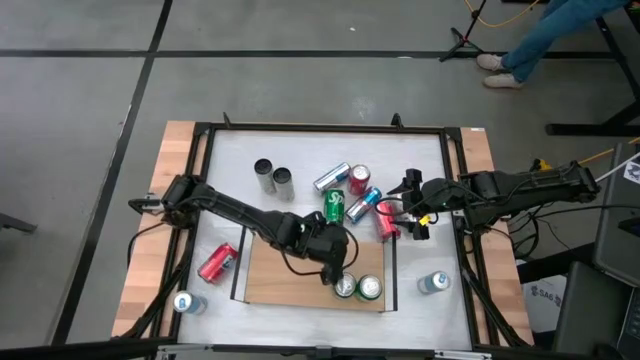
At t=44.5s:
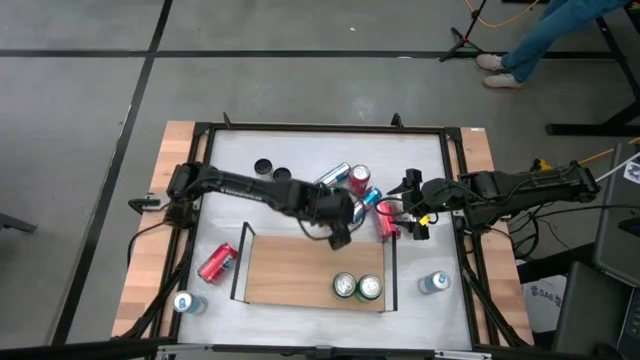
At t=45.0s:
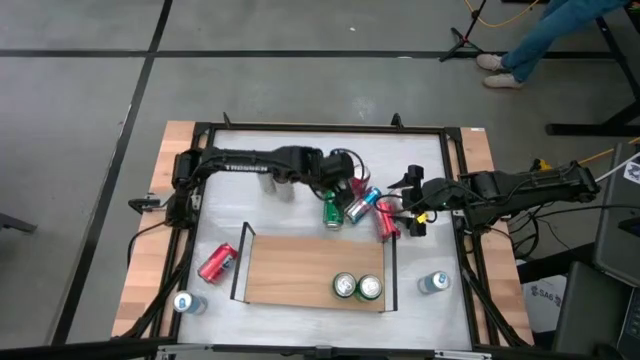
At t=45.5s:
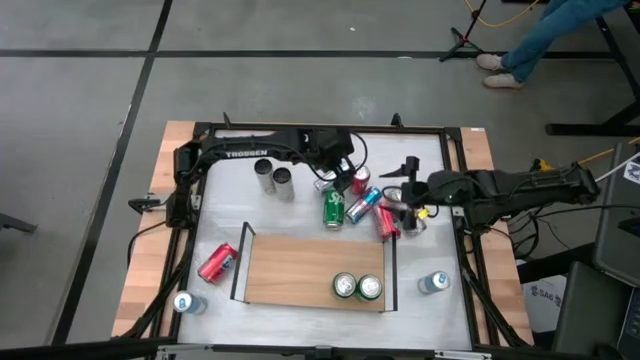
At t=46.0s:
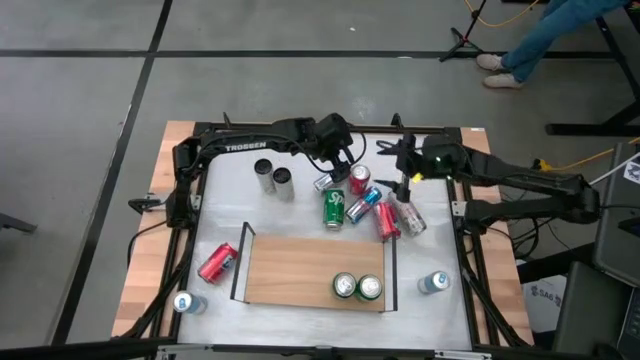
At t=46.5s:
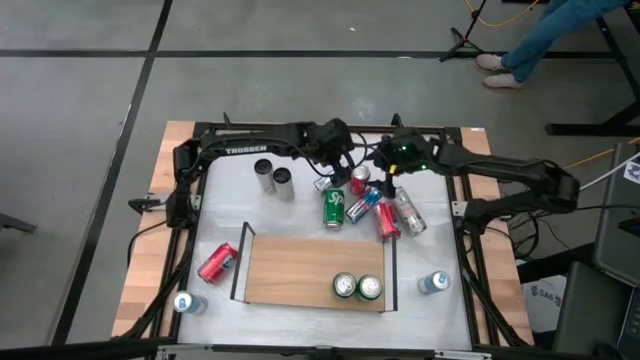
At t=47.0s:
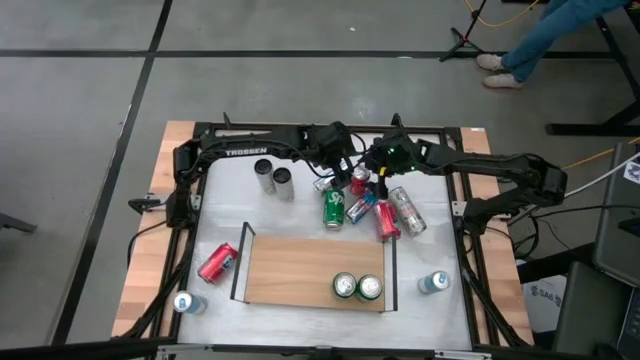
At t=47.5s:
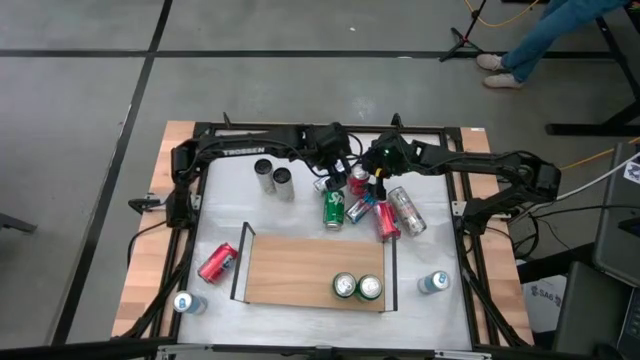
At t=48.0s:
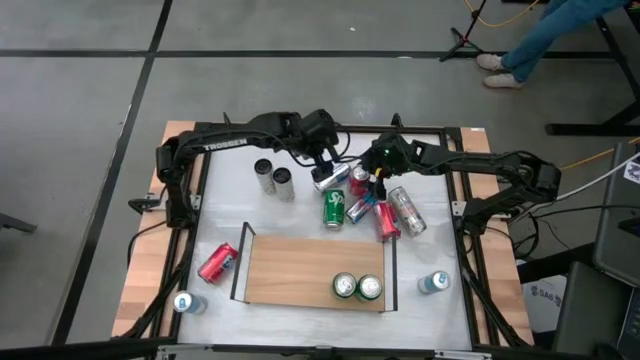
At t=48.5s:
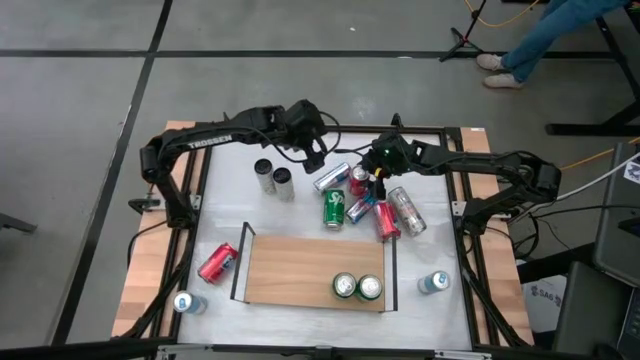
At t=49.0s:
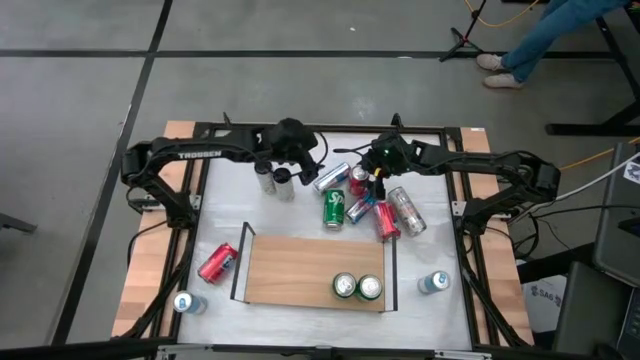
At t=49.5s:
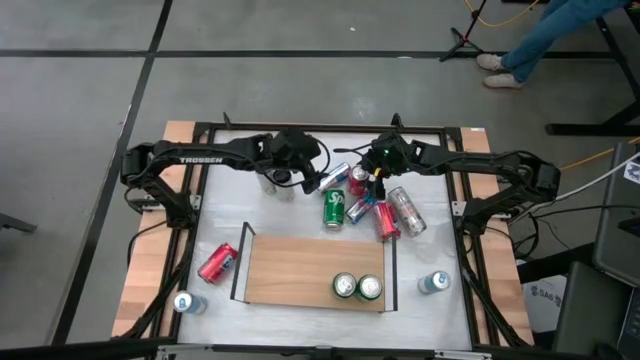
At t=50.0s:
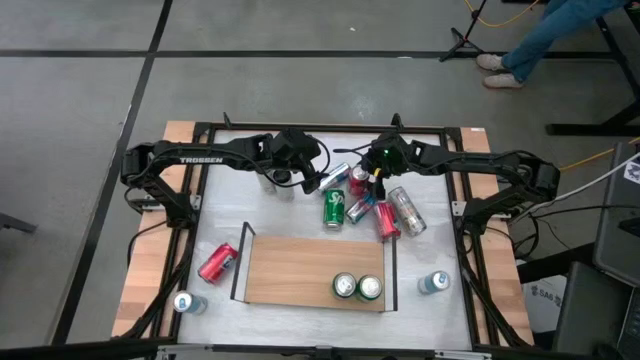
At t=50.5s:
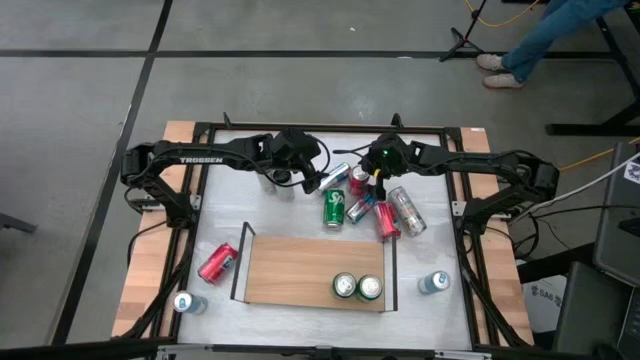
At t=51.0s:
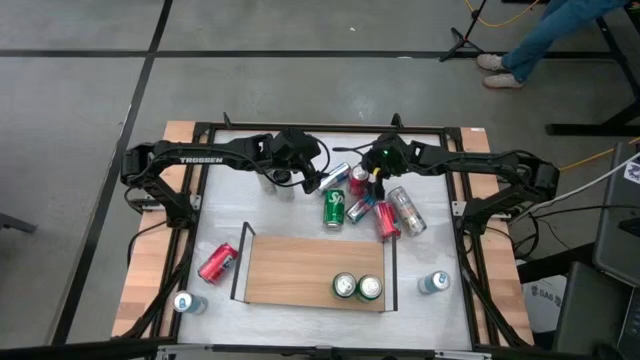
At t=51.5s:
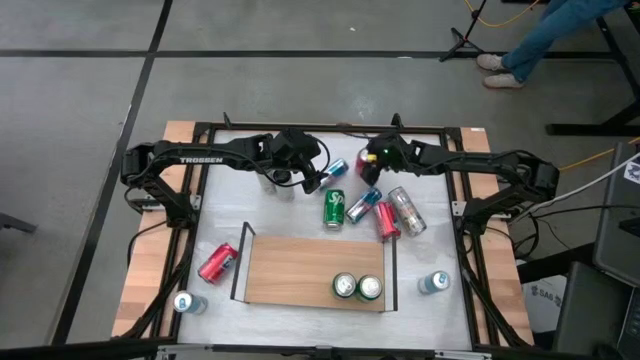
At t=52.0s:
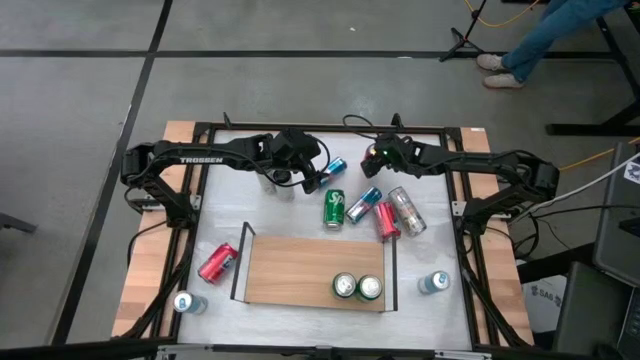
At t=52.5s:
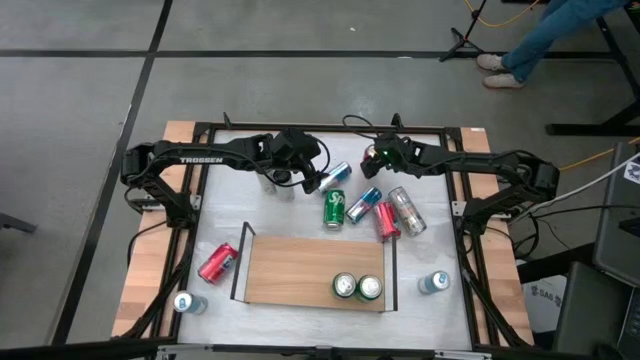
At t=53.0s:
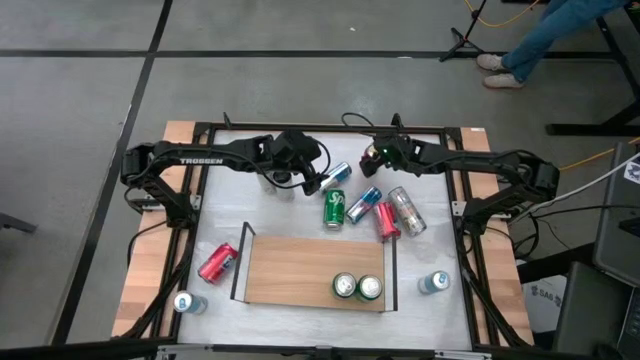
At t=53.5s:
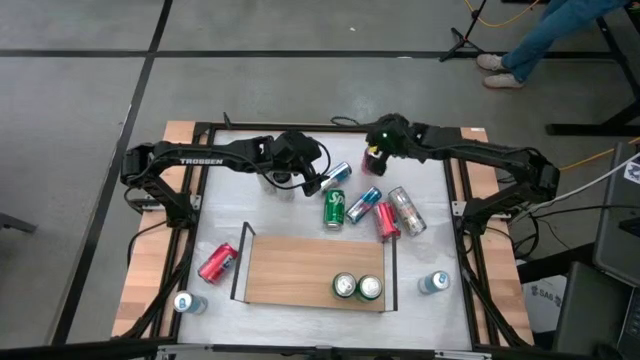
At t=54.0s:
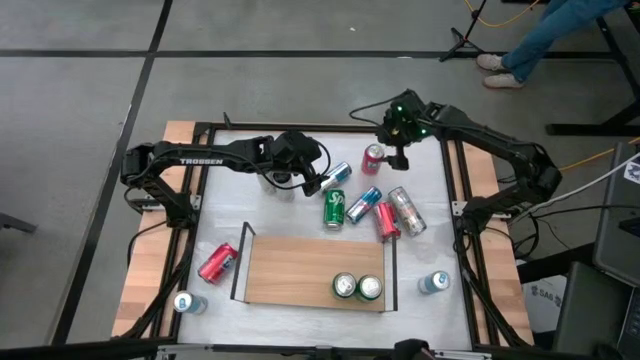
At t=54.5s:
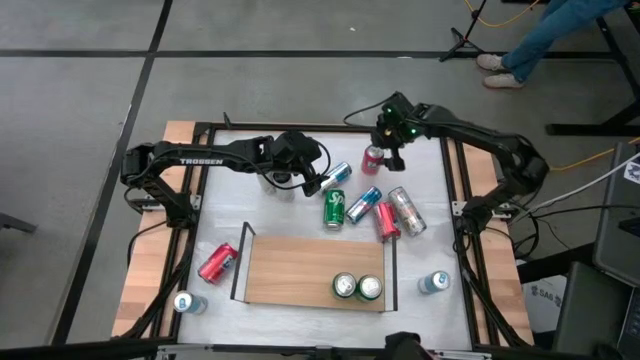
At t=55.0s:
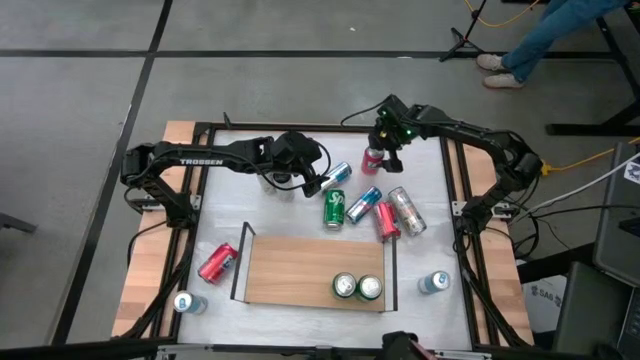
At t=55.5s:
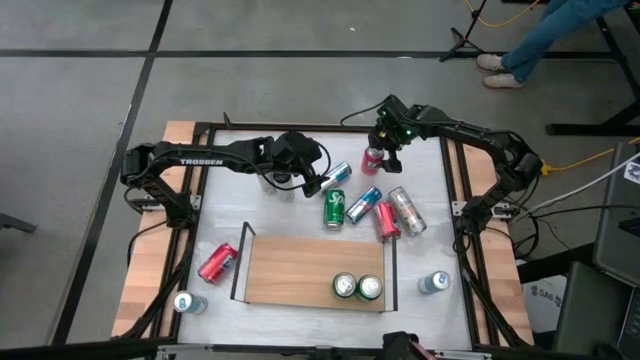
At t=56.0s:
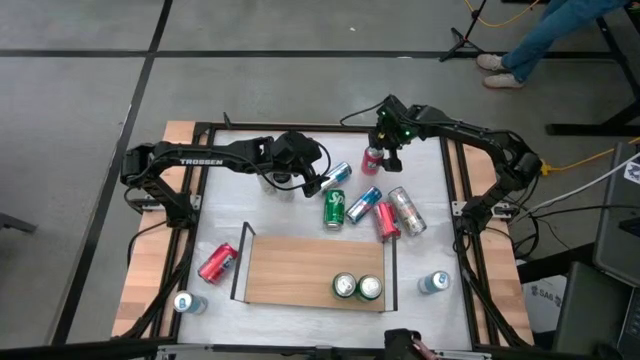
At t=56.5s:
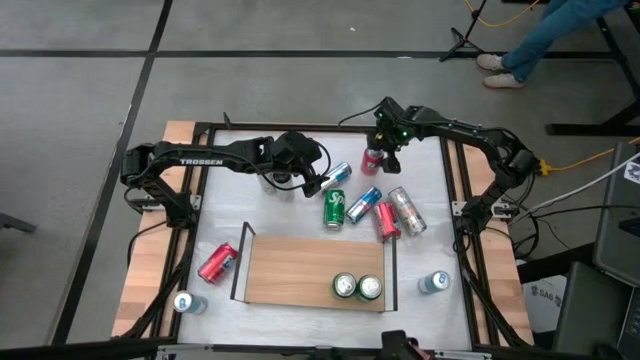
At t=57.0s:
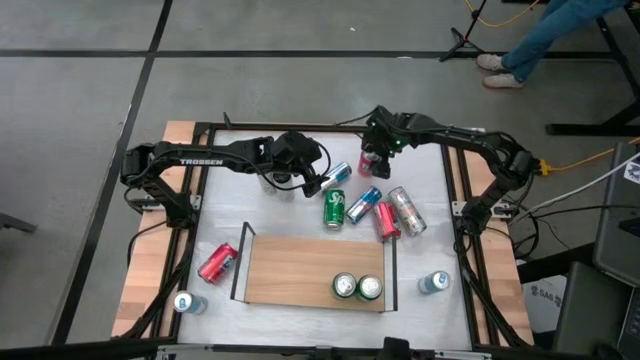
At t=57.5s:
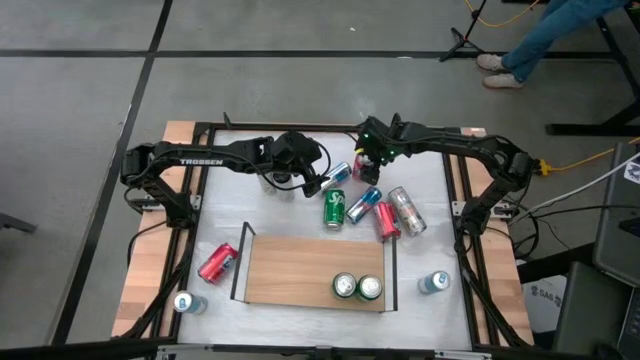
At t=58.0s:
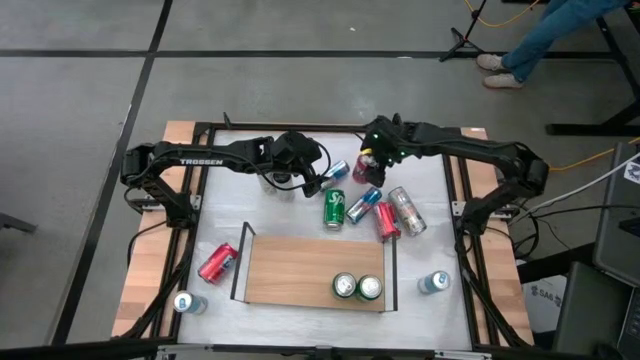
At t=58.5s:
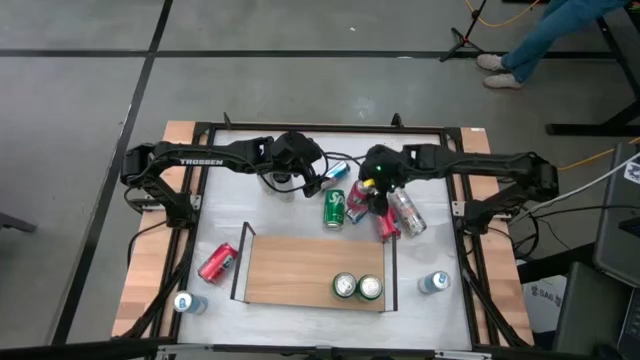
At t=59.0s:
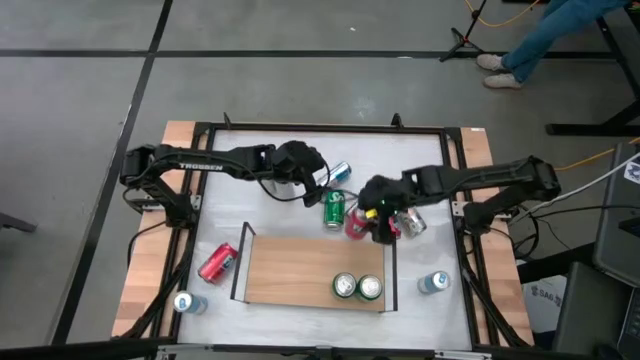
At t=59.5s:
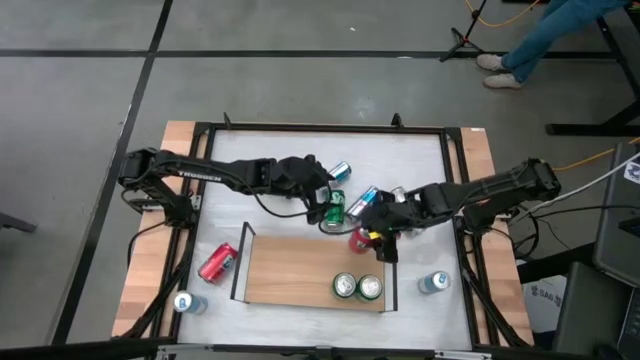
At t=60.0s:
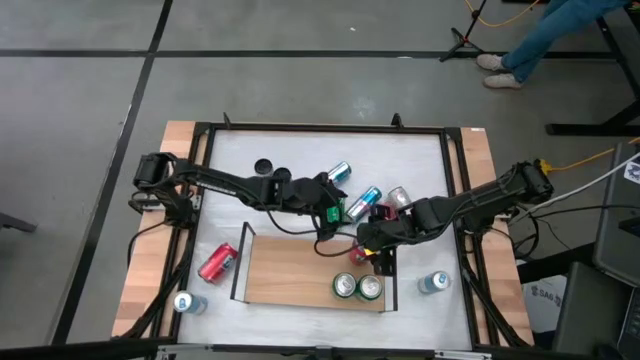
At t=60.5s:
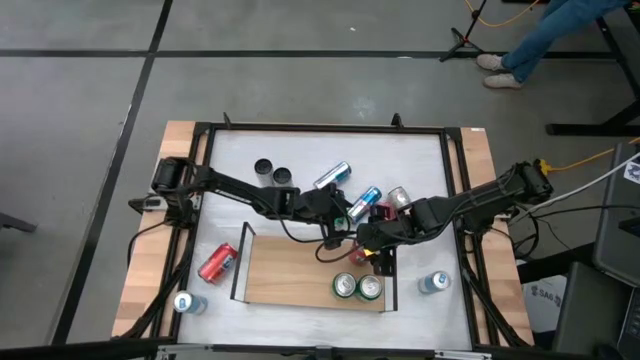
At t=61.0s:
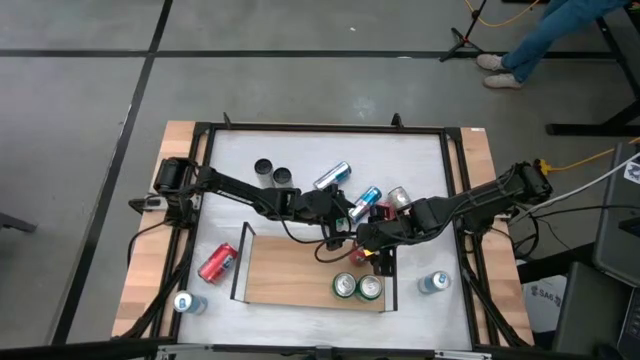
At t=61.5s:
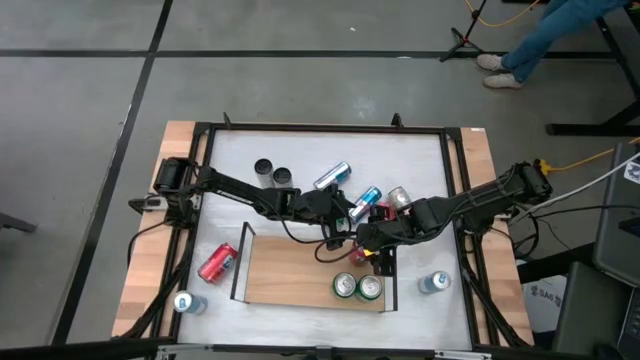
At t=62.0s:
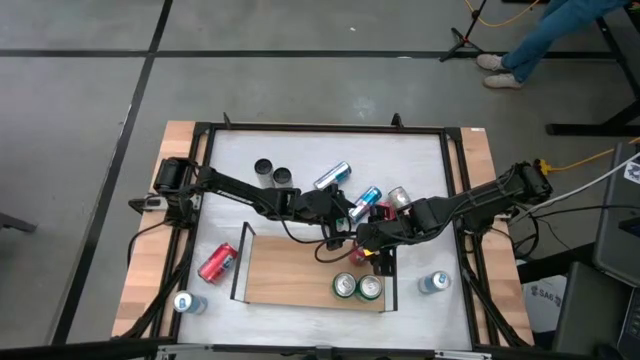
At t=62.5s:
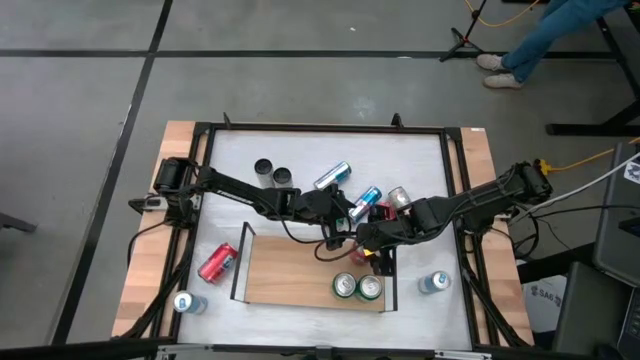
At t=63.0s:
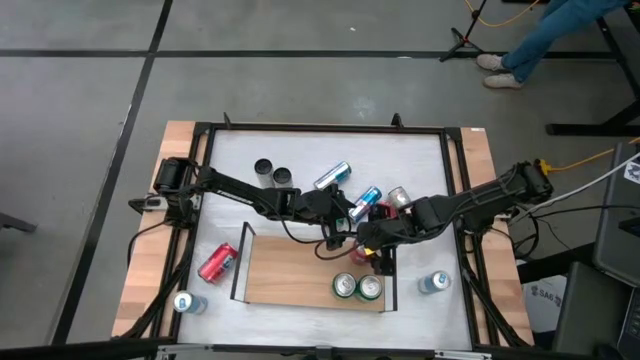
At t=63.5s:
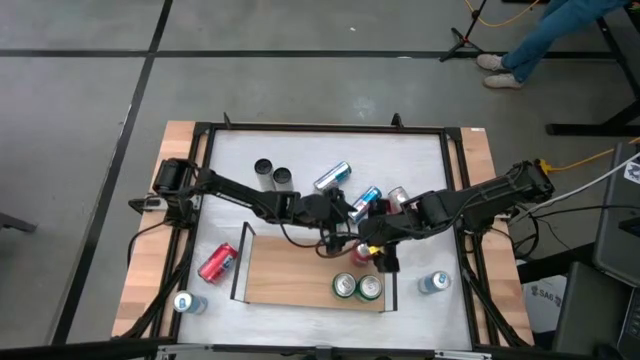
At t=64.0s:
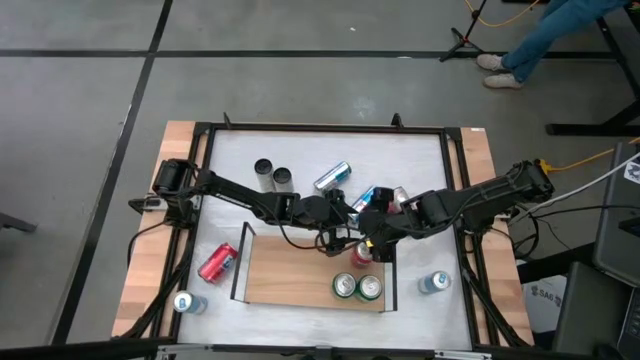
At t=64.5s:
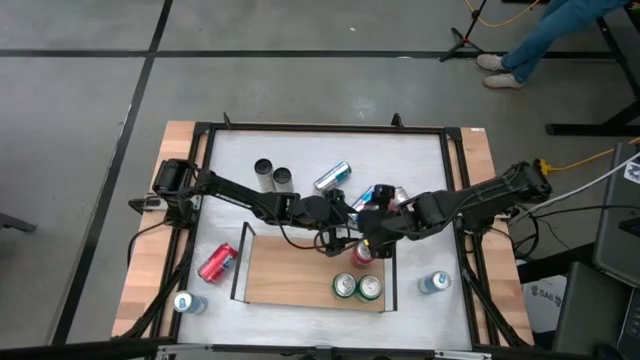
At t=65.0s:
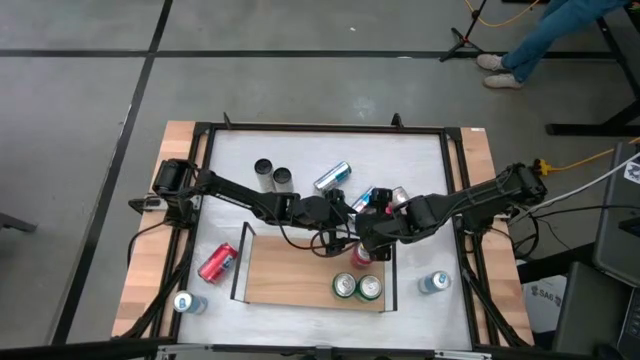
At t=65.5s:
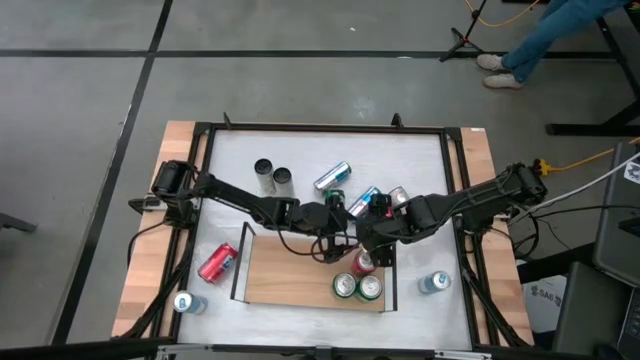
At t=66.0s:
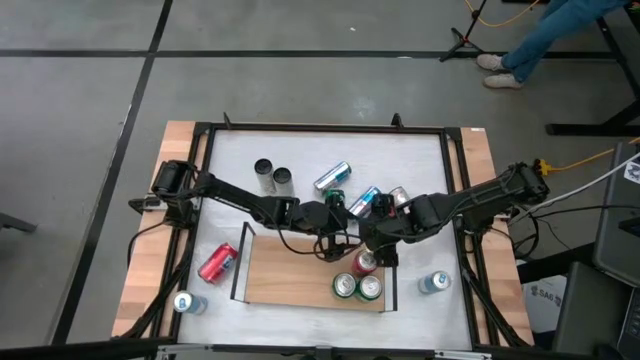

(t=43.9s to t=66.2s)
Task: Place canned beverage on shelf
Put the top center red soda can on the shelf
